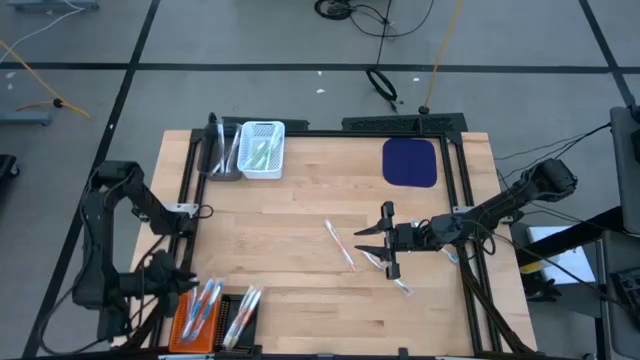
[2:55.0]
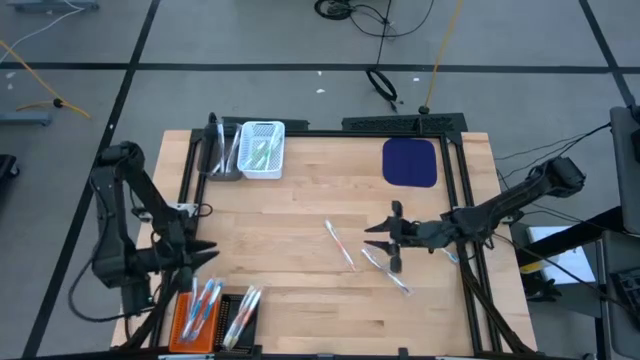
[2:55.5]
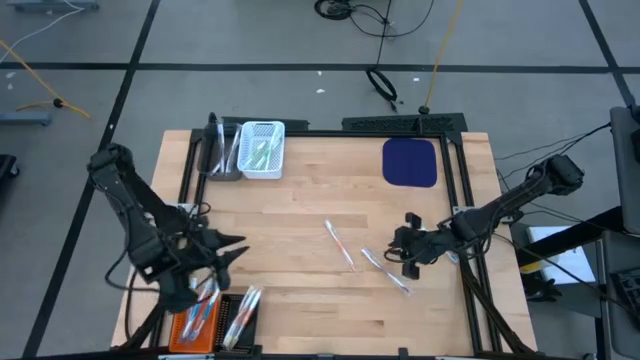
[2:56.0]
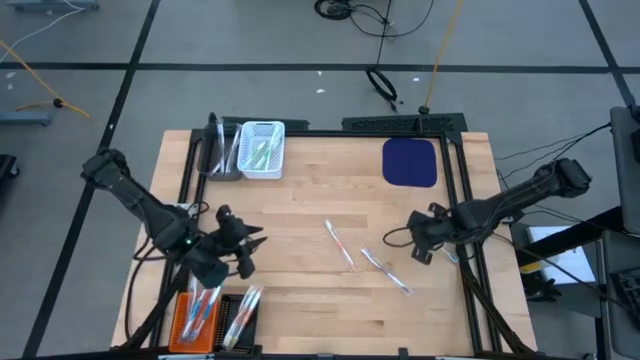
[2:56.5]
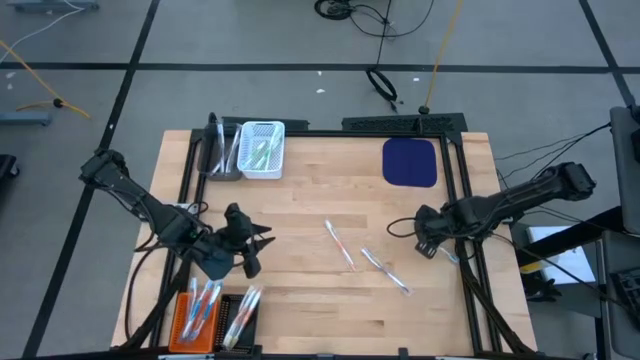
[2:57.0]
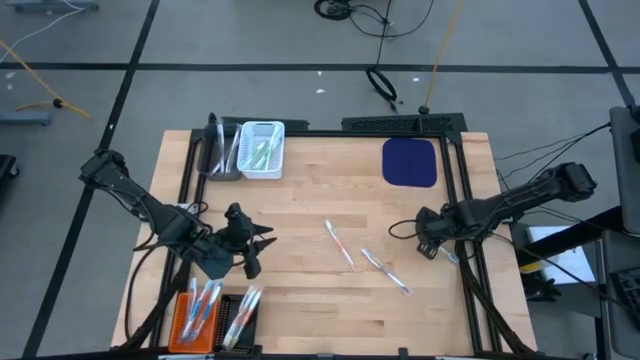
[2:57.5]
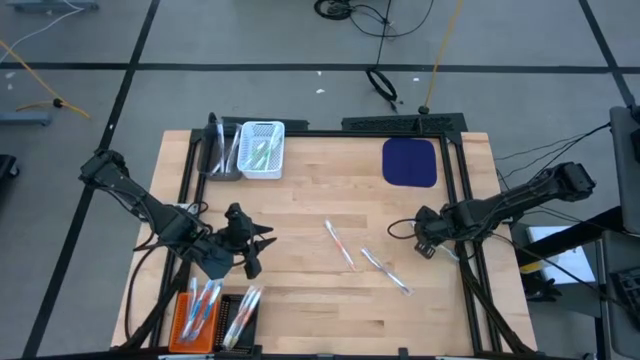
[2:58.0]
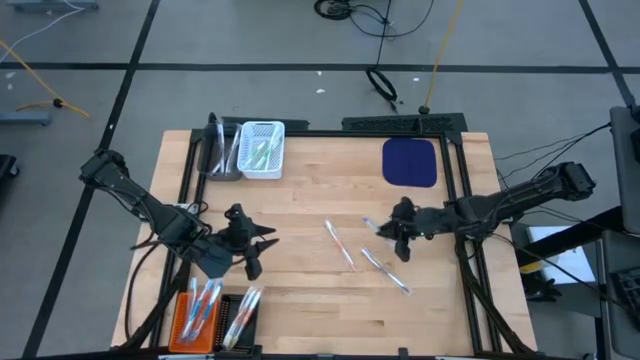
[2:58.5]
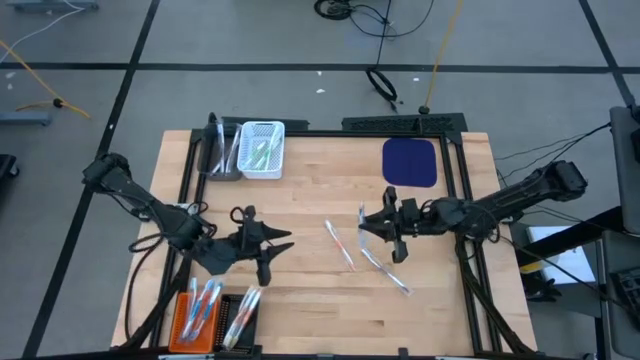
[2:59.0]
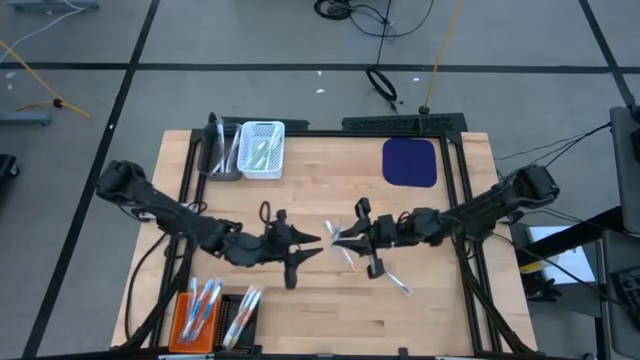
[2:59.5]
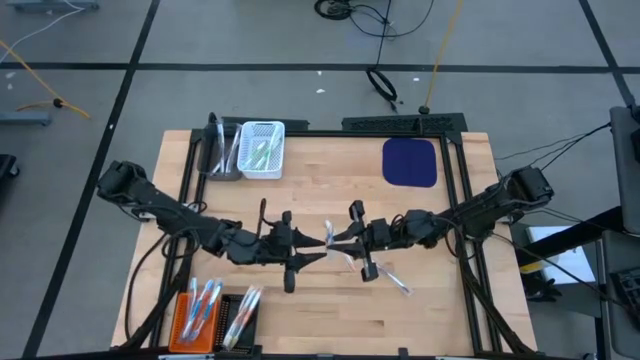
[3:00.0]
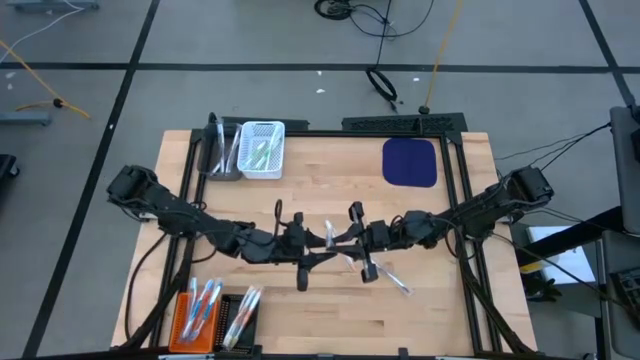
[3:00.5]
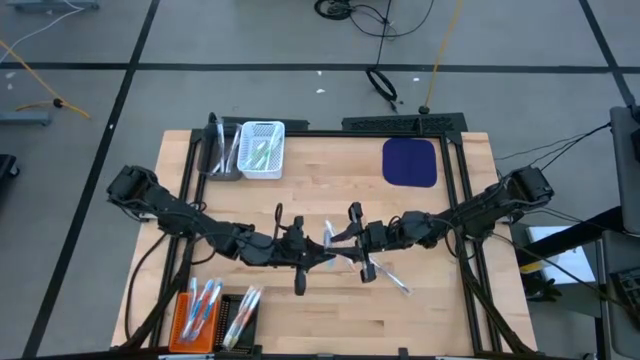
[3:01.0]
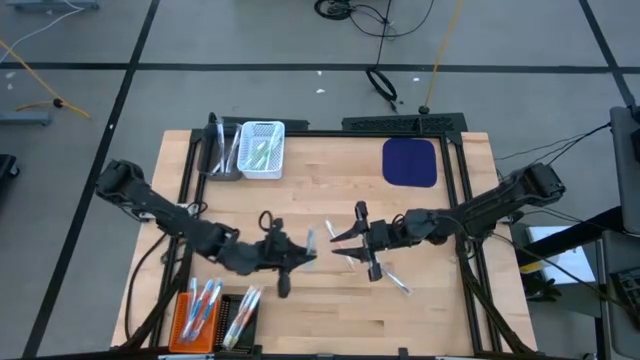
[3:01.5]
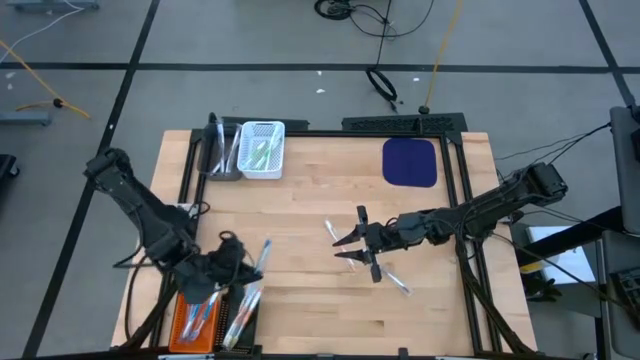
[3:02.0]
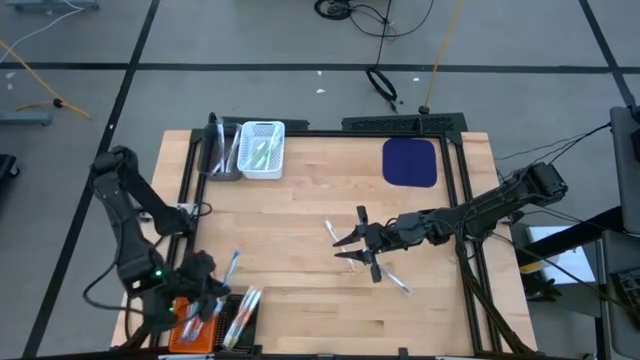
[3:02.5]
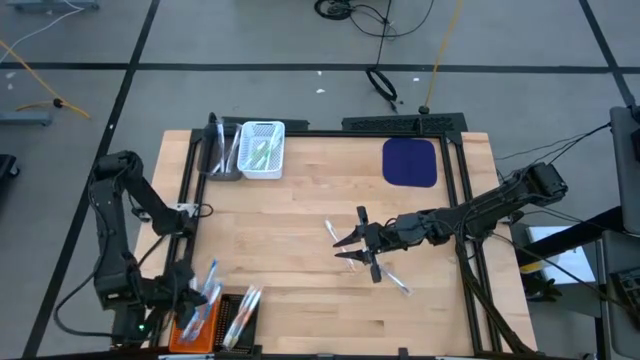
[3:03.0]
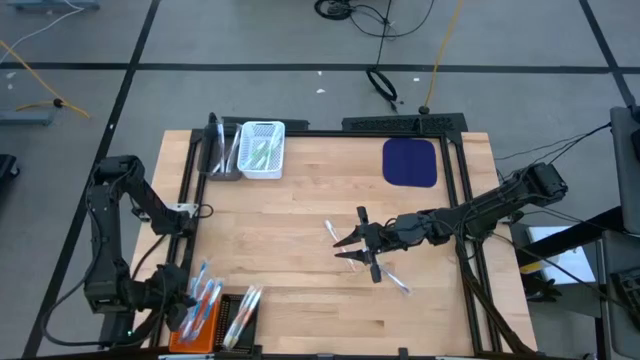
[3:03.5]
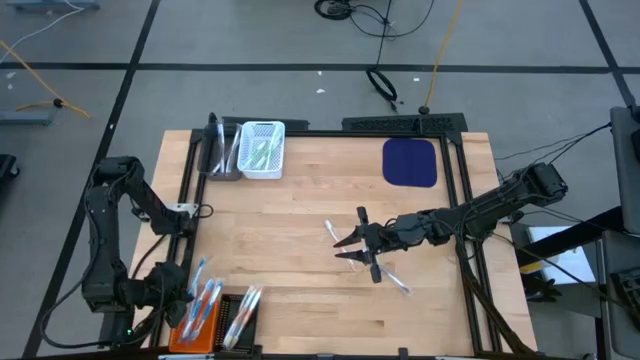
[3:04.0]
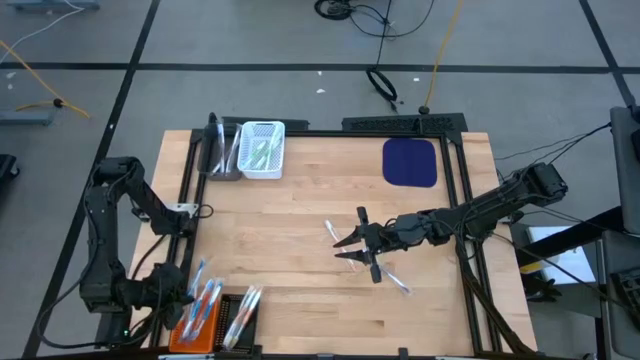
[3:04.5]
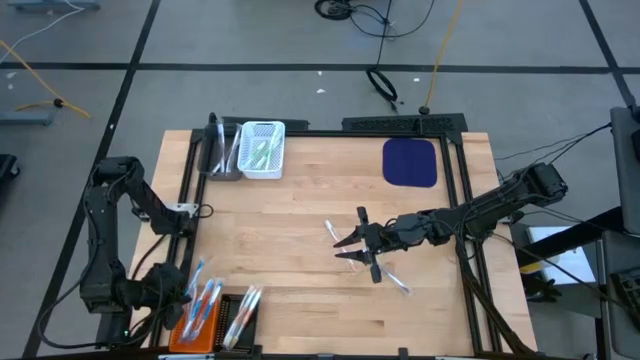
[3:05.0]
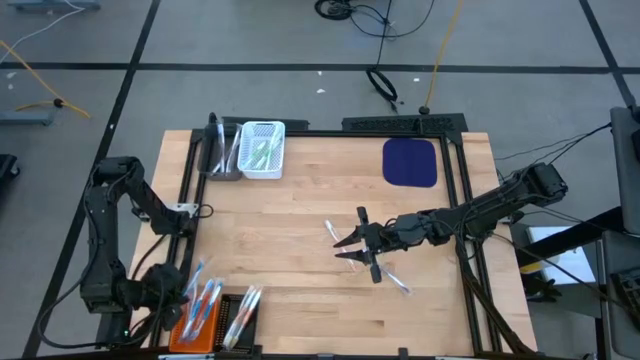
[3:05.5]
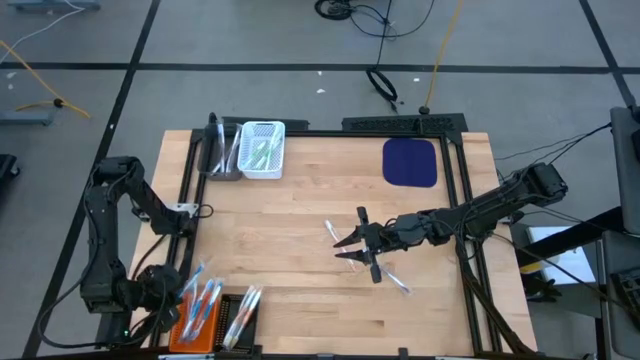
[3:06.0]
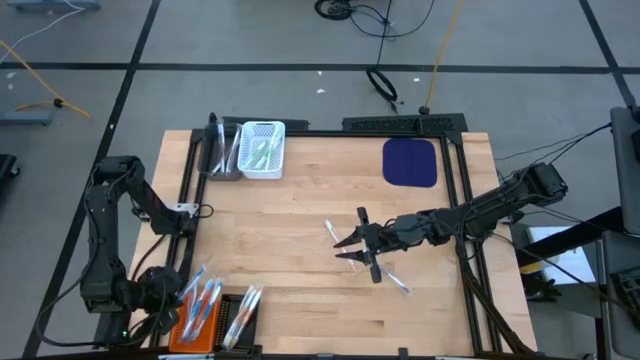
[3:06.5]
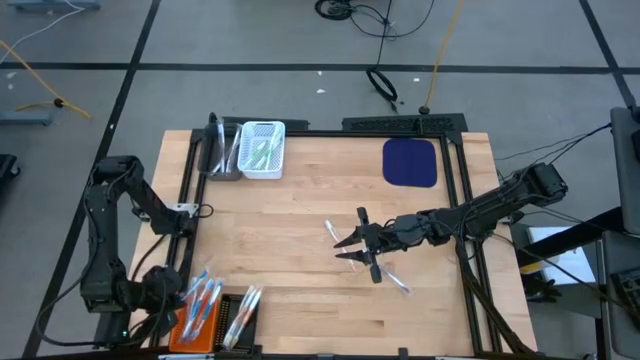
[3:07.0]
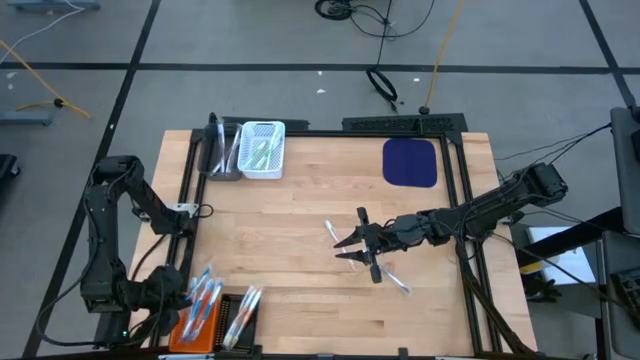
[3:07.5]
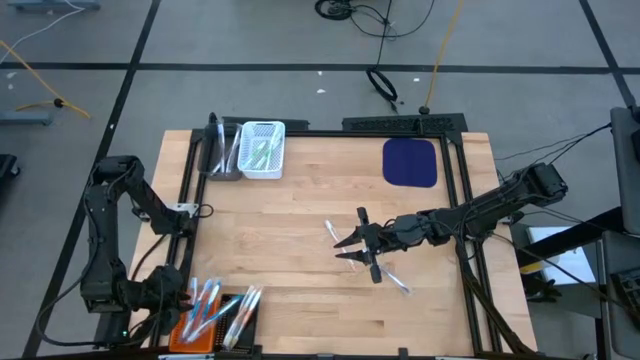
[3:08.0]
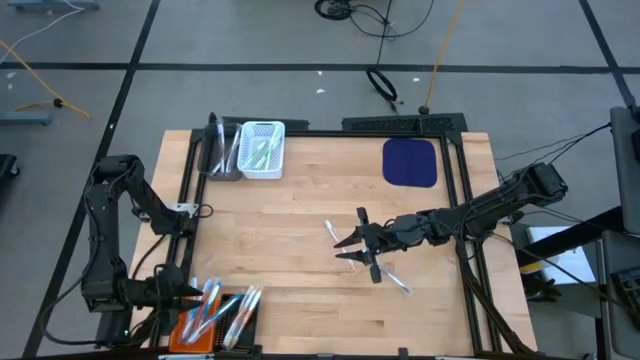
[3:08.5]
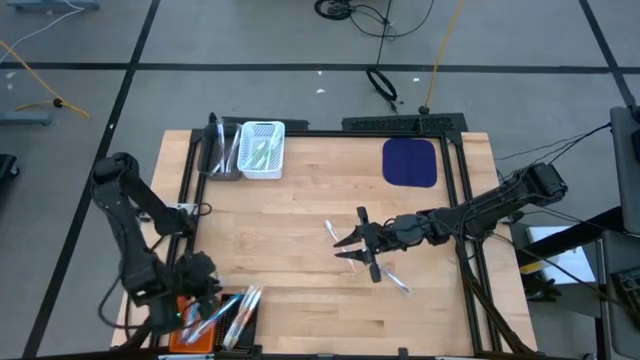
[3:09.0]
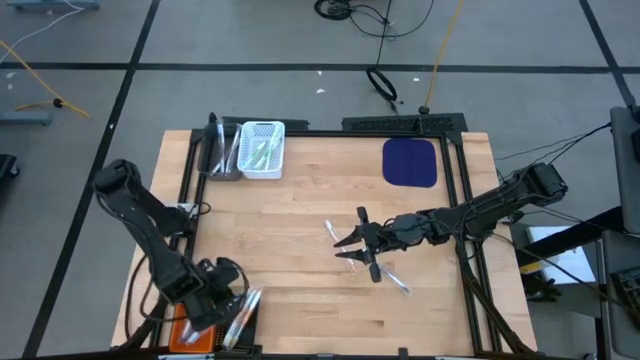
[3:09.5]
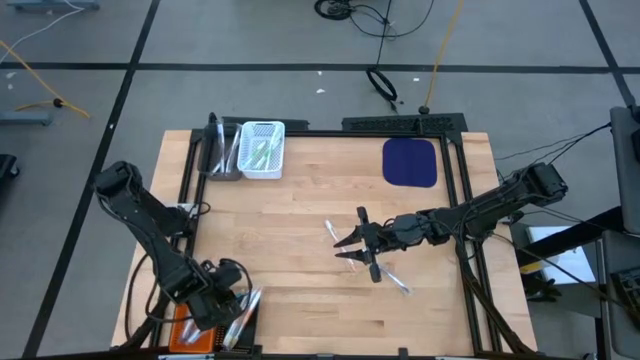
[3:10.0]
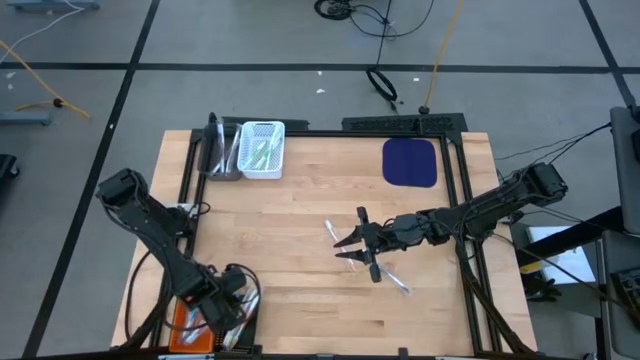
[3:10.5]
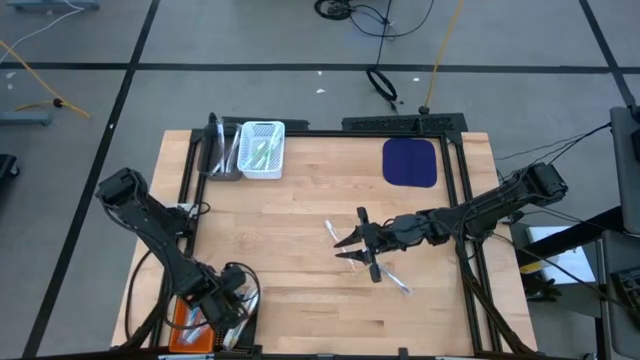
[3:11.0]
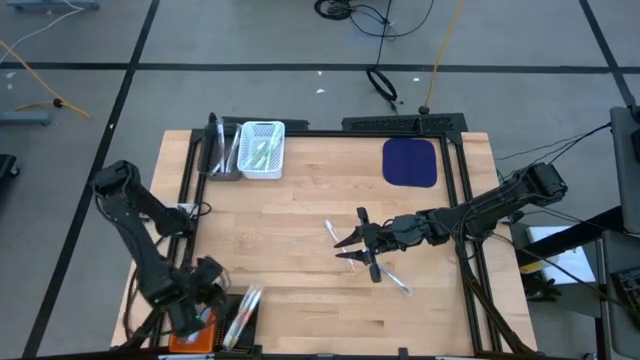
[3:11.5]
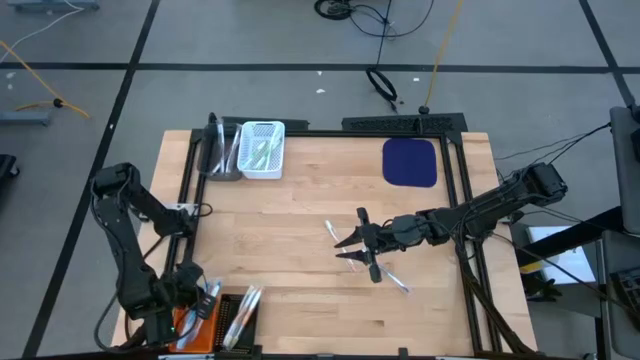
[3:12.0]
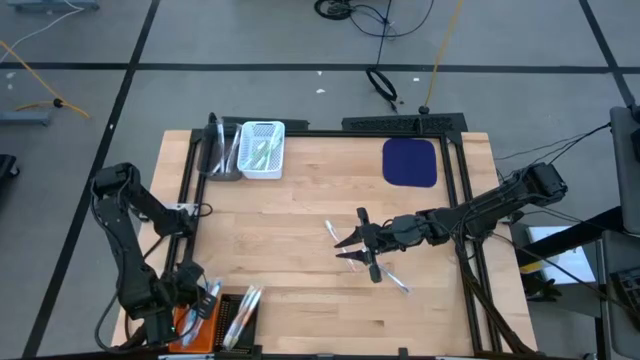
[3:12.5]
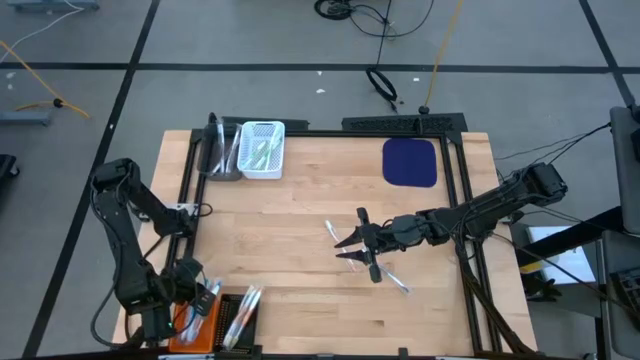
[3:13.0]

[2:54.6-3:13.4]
Task: Pick & Place Toothbrushes
Put the blue toothbrush into the orange bin

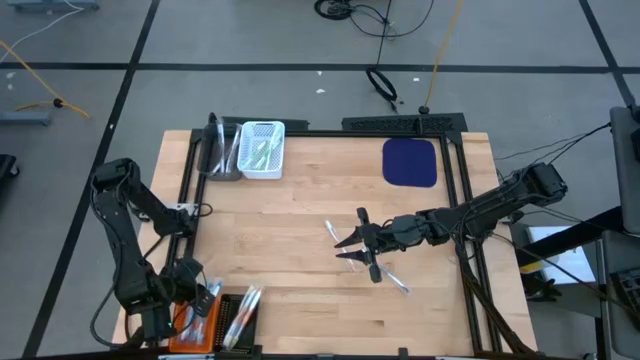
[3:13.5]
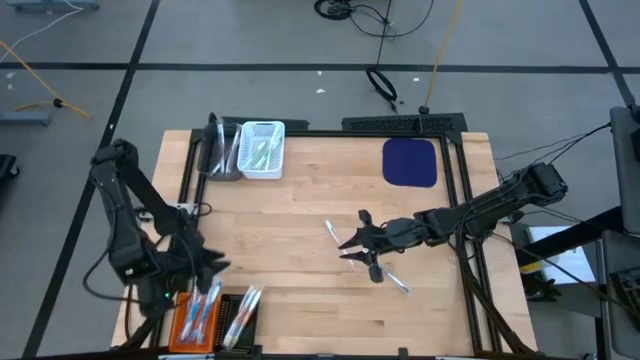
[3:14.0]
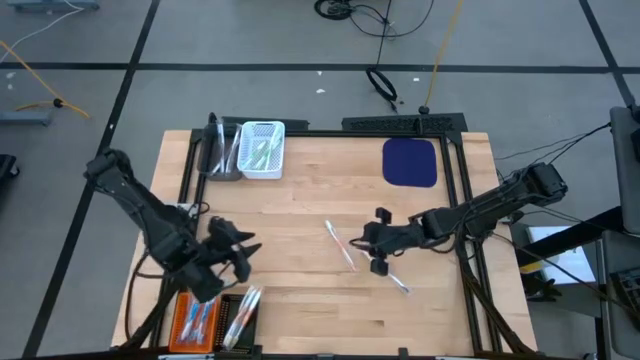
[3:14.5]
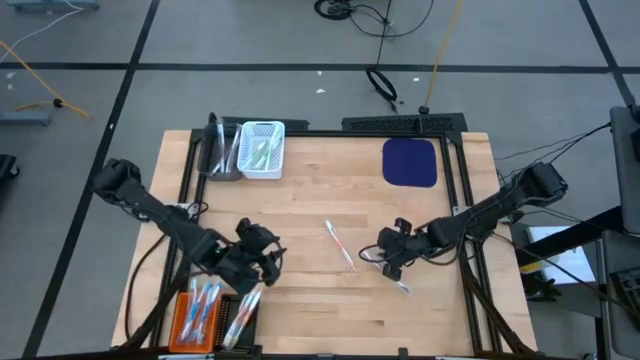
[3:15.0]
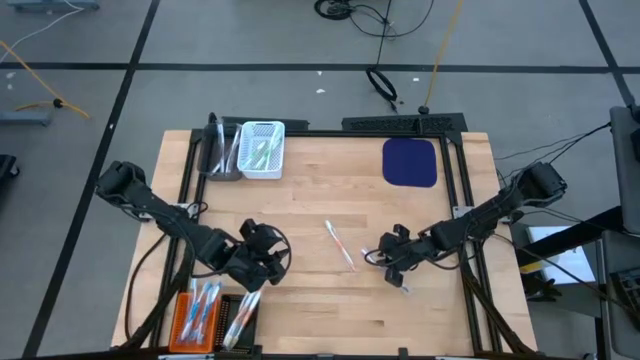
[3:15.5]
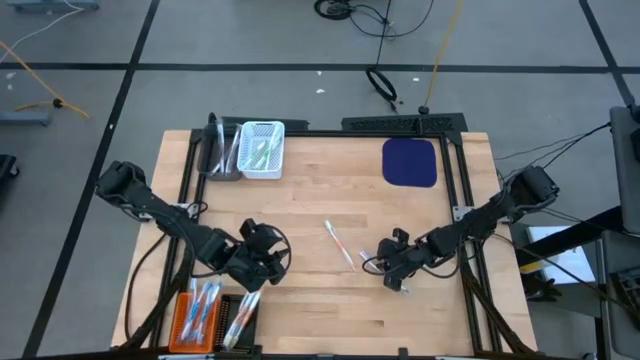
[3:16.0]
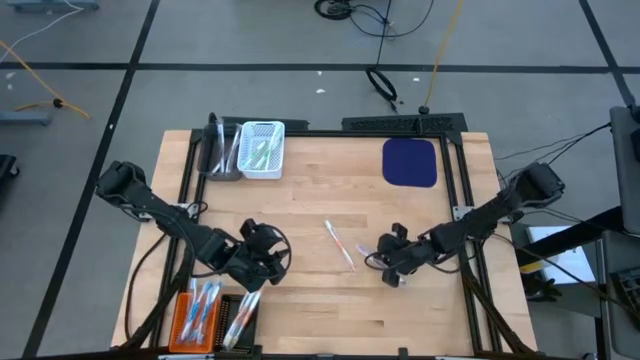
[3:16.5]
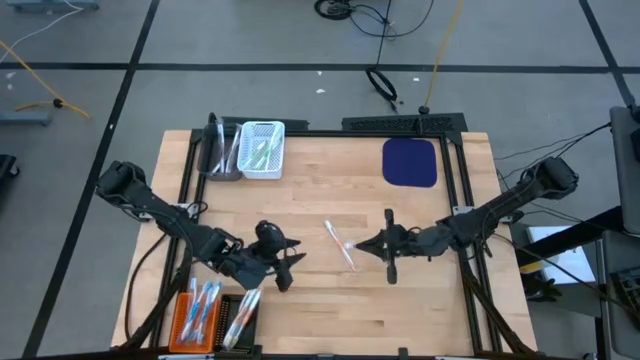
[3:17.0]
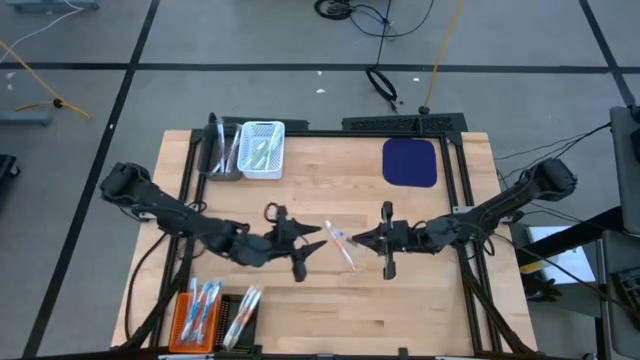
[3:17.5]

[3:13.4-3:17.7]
Put the violet toothbrush into the gray bin
